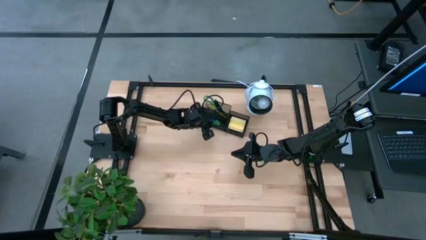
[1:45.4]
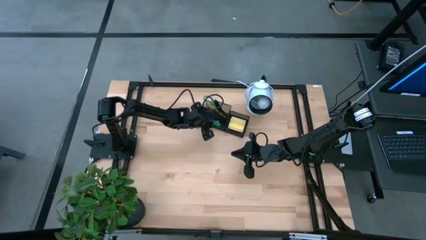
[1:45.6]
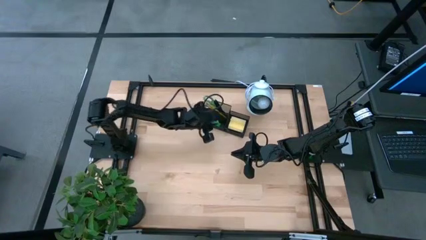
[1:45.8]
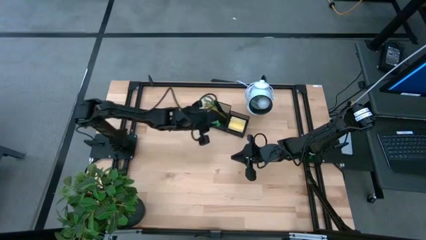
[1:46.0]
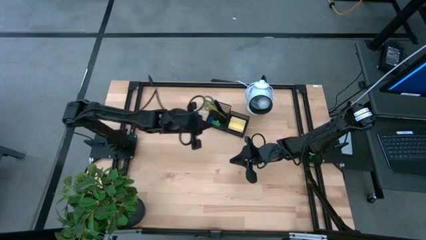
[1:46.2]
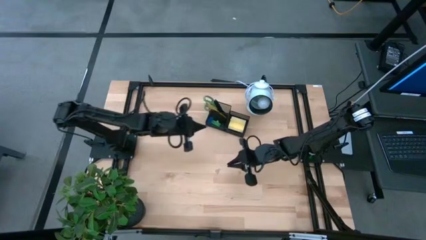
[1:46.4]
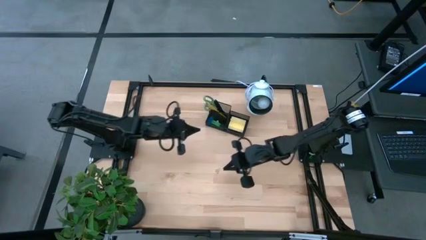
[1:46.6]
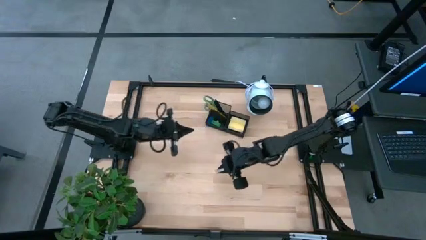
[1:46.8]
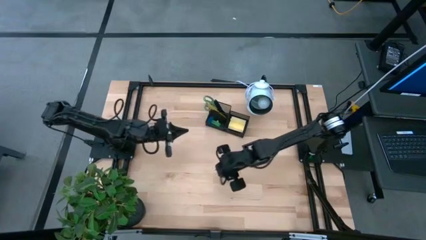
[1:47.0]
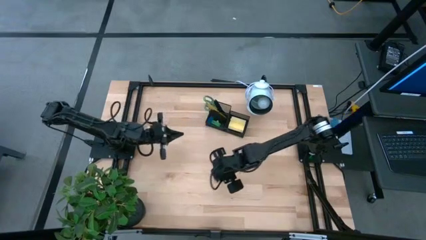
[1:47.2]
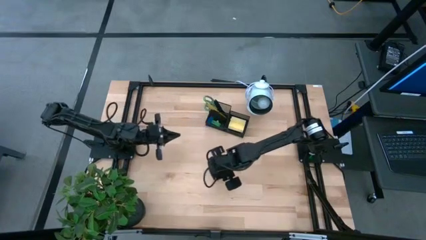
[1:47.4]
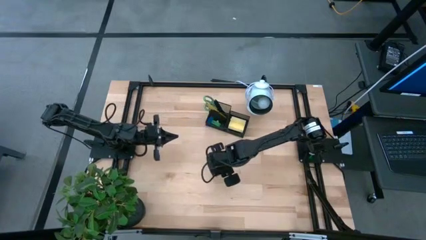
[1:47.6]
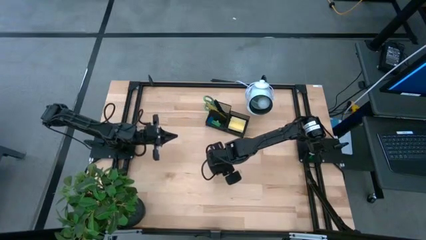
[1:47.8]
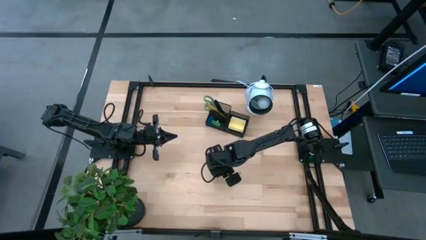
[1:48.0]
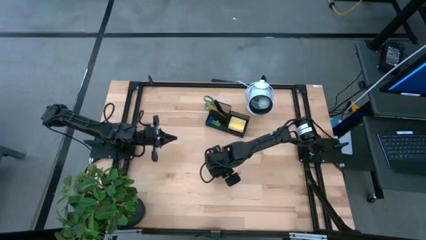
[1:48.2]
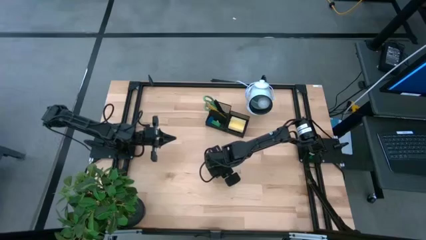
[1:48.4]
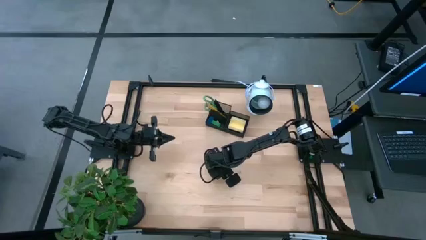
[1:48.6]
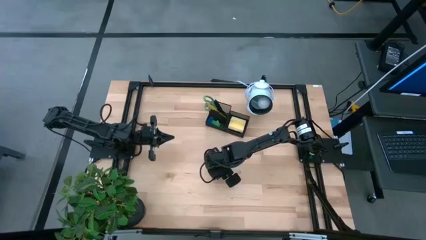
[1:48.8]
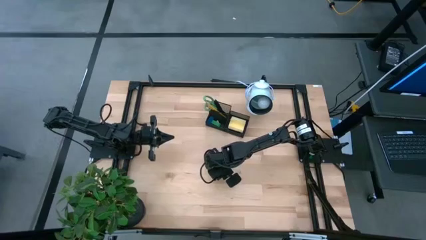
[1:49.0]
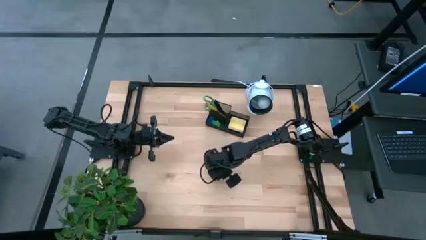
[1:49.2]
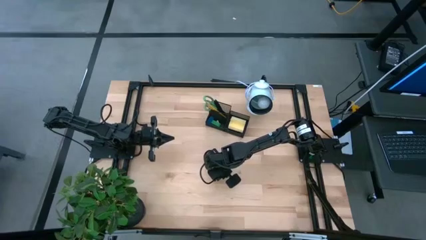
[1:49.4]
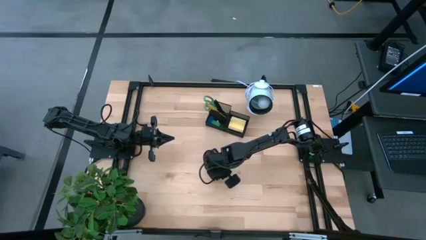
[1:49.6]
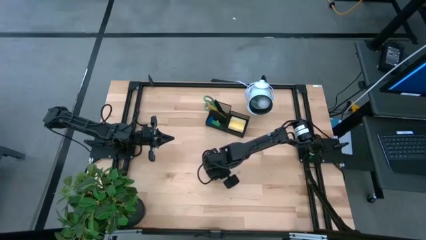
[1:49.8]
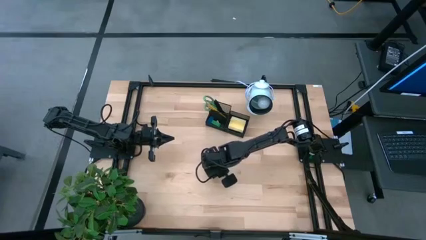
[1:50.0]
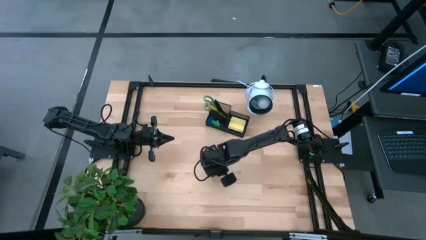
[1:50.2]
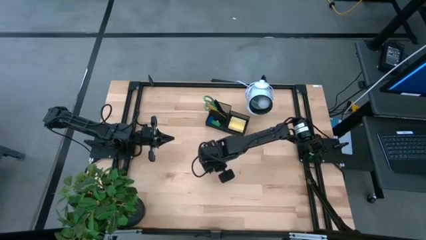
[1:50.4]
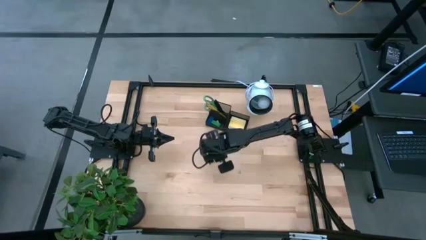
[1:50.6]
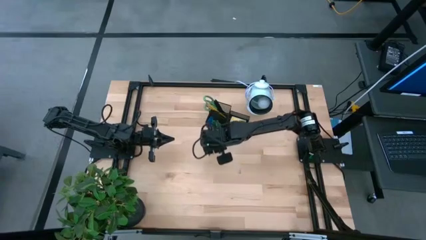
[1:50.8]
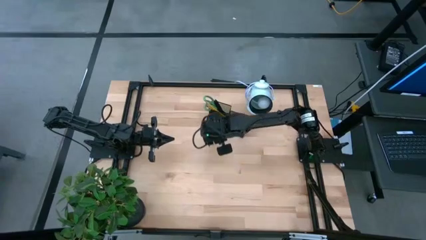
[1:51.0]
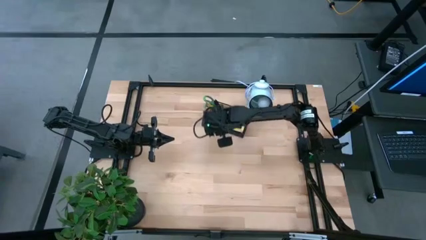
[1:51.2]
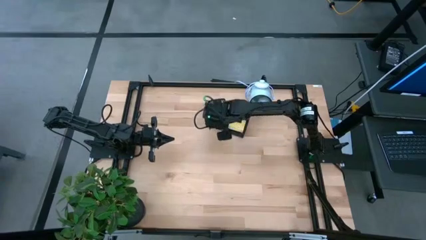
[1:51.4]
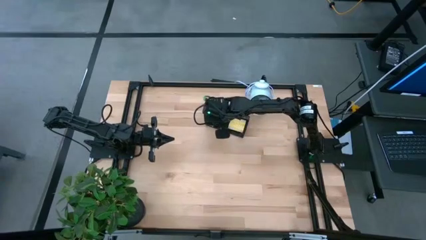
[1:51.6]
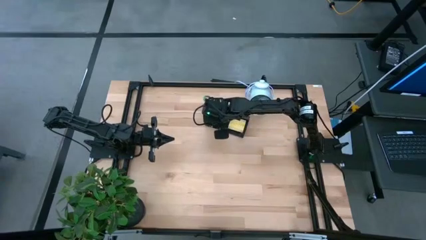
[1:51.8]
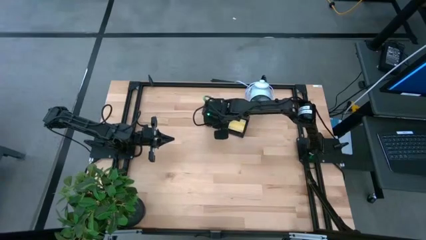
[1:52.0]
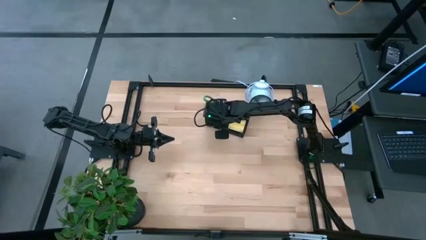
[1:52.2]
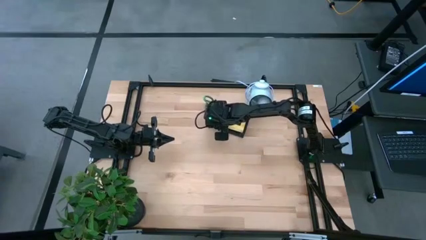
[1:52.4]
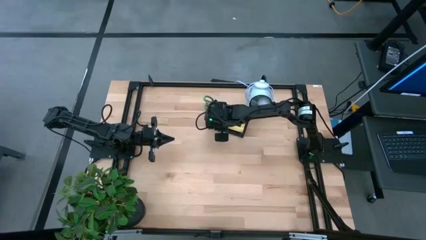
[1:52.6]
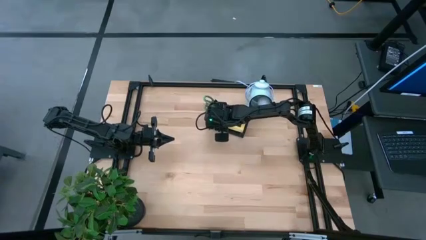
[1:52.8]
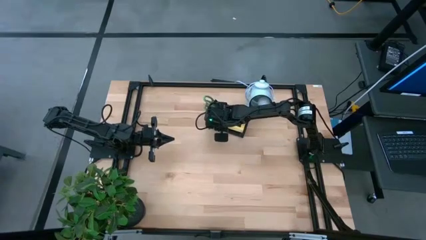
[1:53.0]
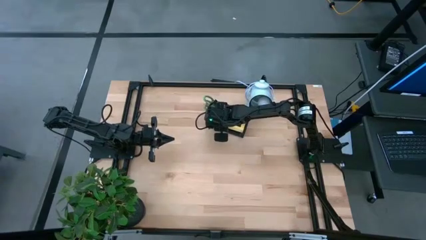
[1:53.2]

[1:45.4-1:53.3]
Task: Pick and place office supplies into organizer
Put the yellow binder clip into the black desk organizer

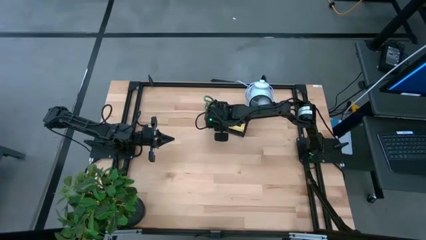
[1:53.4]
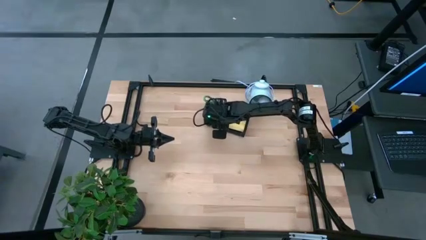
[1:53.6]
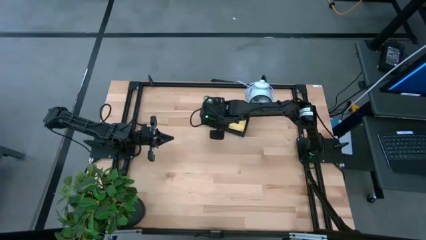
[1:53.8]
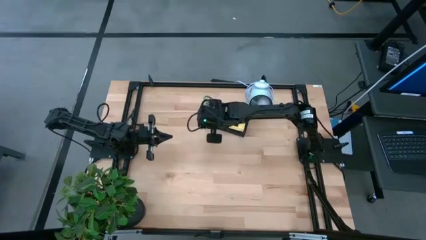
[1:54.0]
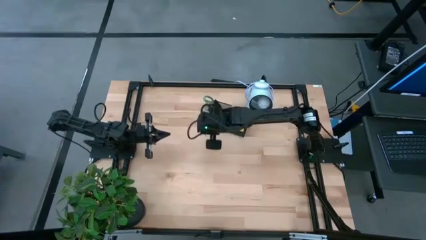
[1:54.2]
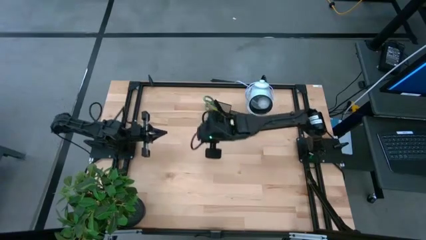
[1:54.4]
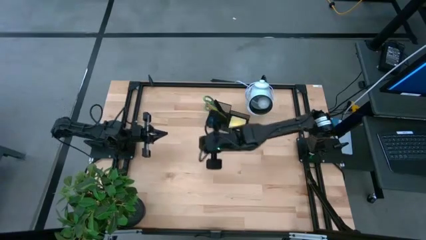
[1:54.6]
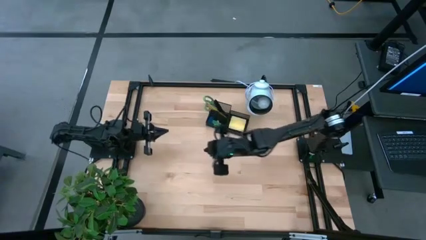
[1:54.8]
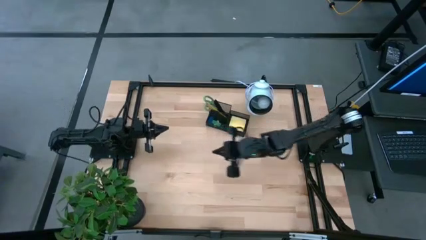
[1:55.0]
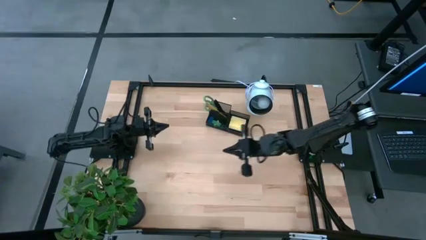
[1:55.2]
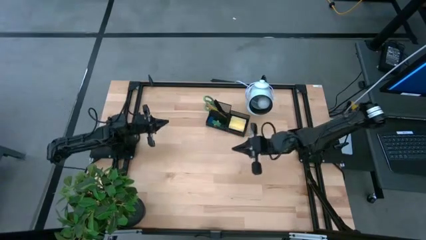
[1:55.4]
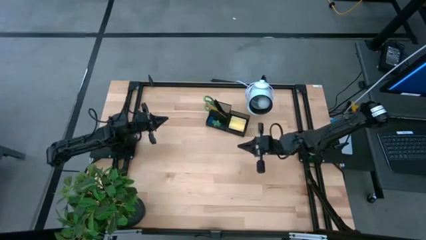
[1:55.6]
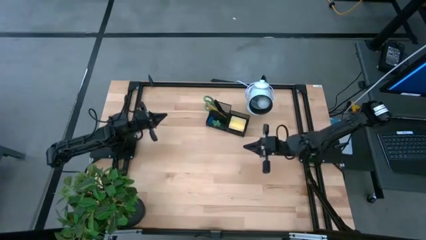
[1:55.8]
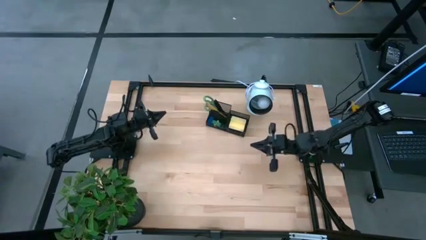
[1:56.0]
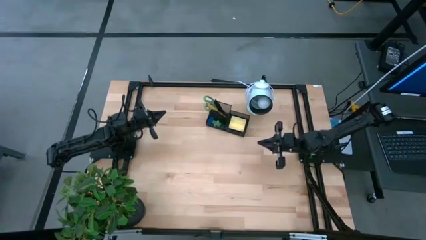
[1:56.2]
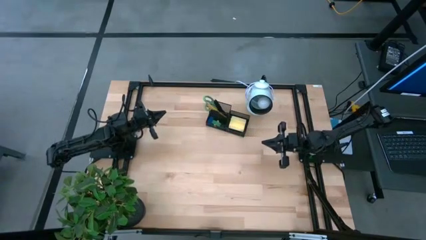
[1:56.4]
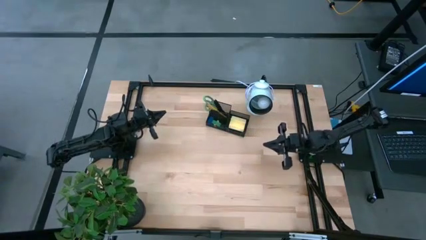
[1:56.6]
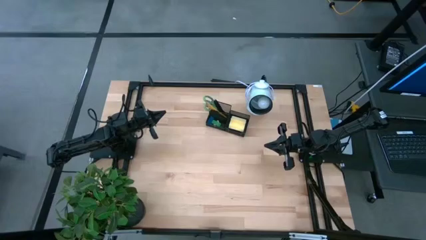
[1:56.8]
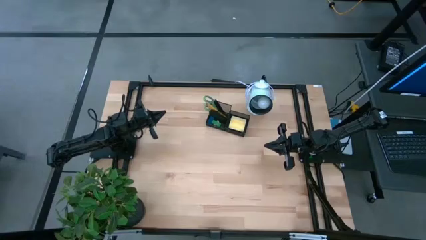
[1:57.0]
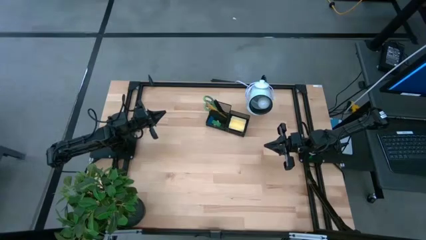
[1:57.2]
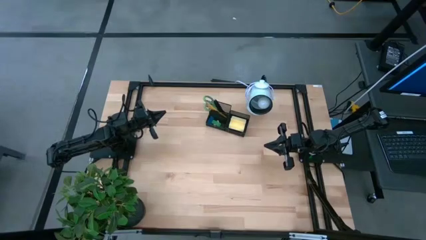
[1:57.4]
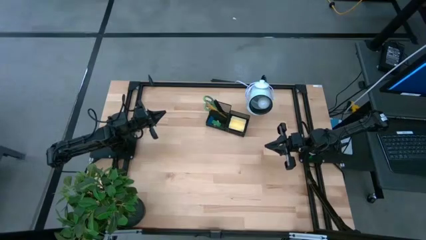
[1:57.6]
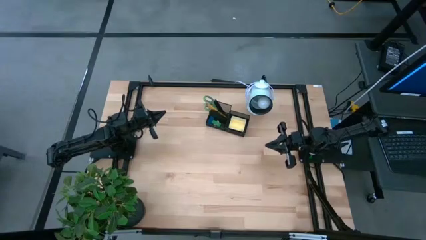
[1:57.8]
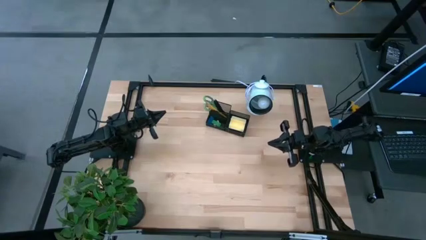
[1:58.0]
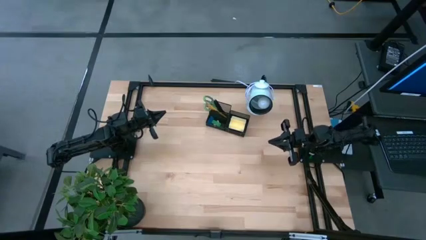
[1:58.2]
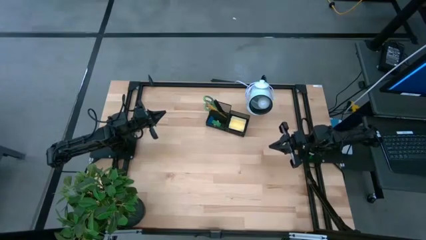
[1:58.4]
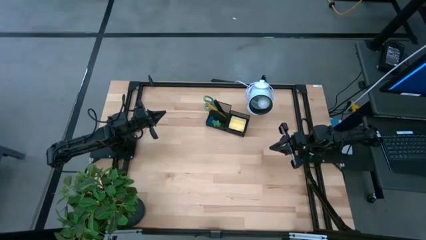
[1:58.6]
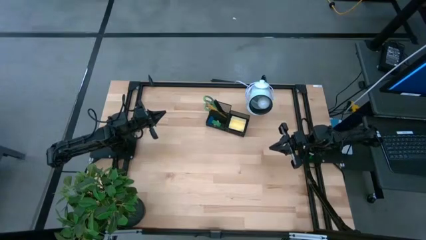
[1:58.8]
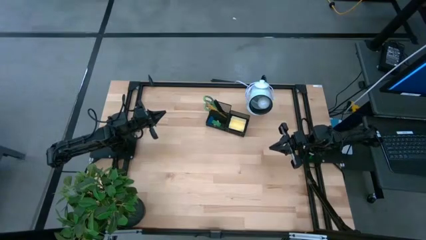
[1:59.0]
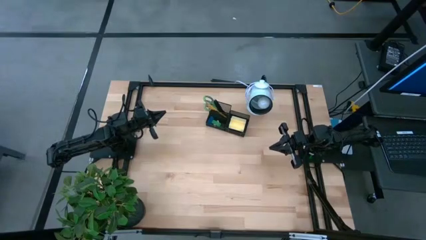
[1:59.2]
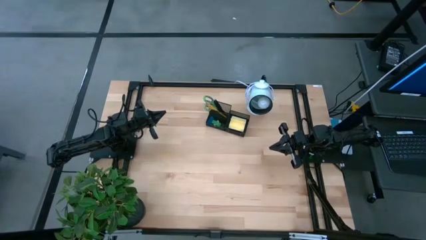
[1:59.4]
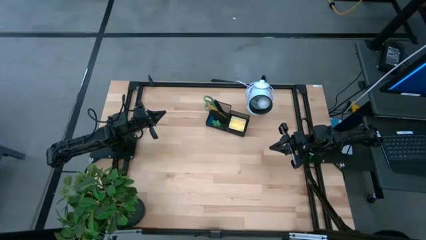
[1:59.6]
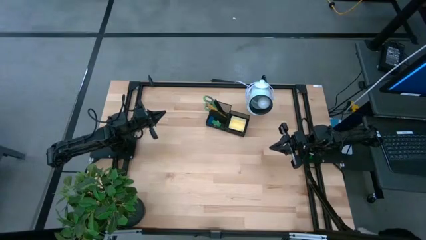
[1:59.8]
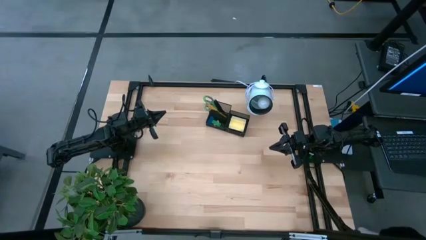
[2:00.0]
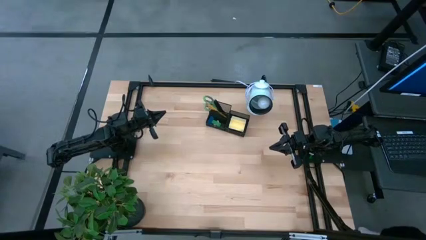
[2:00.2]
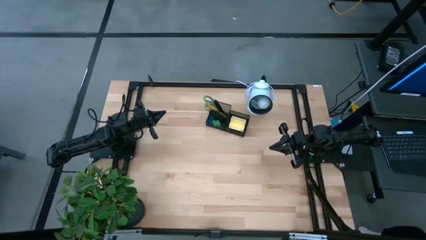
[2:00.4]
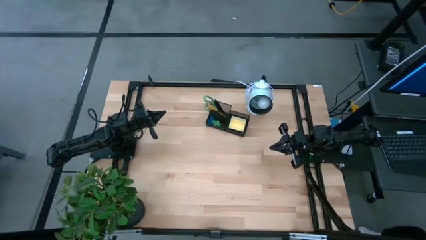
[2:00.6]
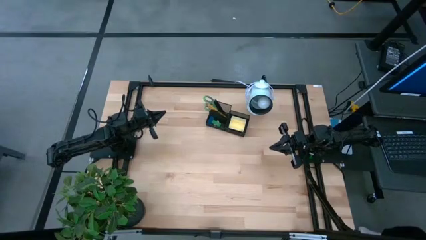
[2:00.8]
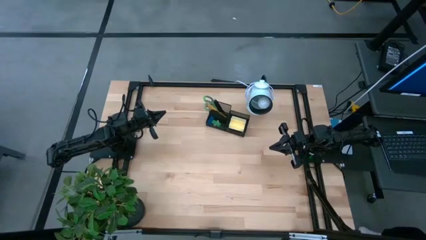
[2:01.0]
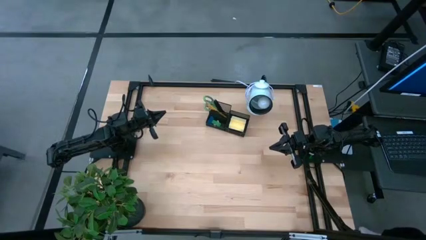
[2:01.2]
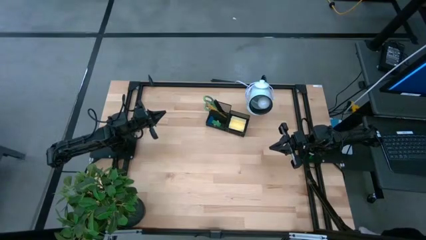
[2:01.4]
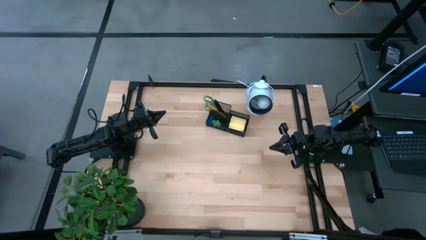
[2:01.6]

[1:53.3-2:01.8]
Return to Home Position
